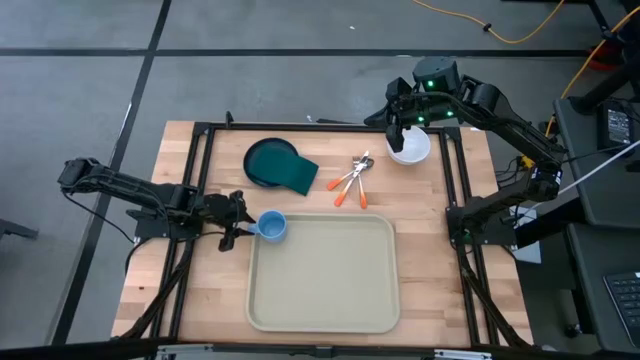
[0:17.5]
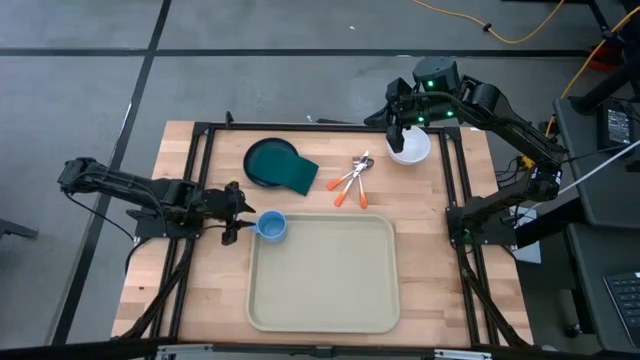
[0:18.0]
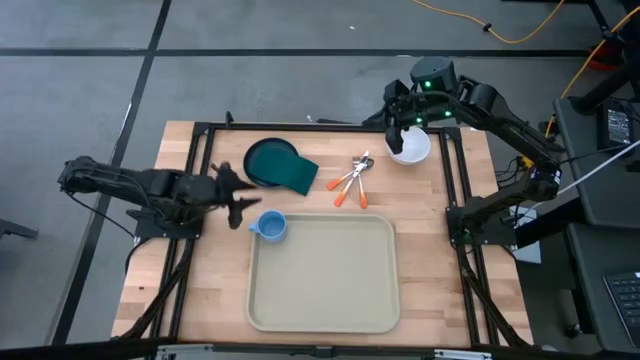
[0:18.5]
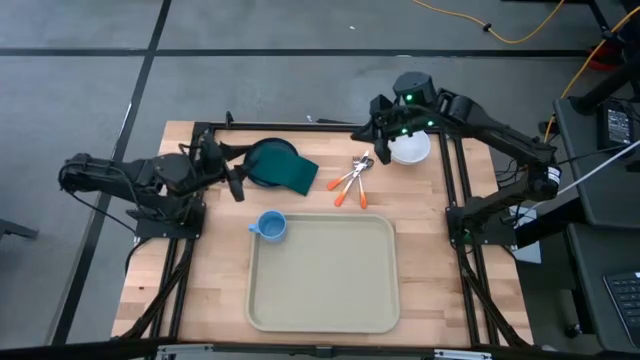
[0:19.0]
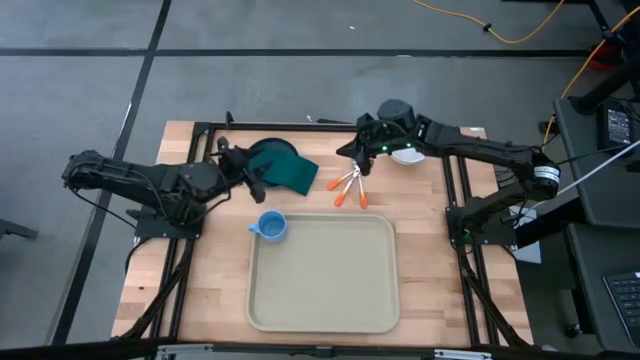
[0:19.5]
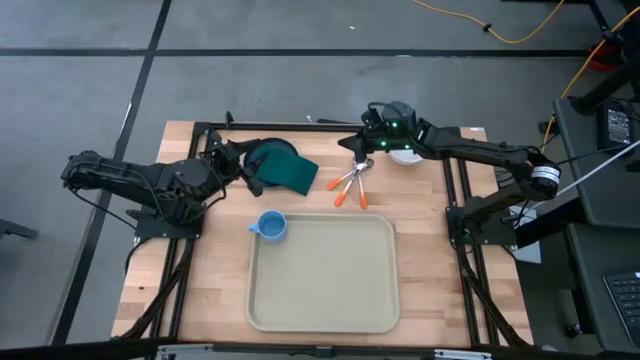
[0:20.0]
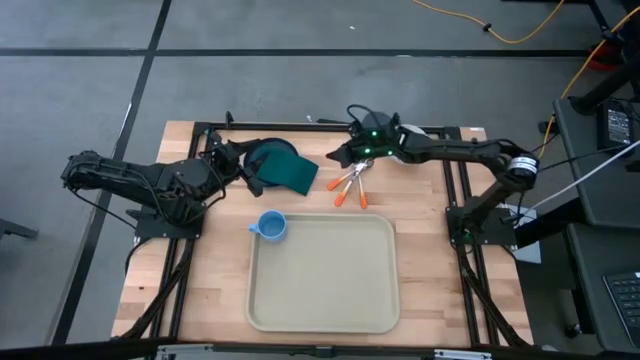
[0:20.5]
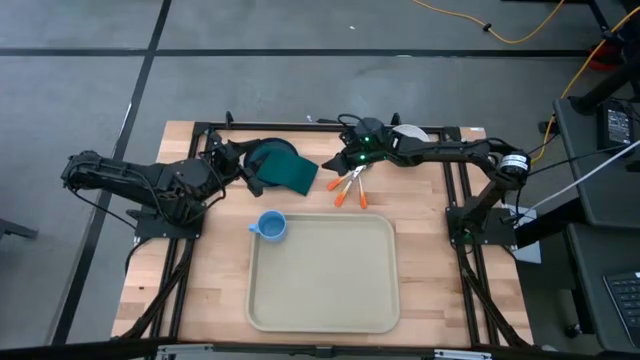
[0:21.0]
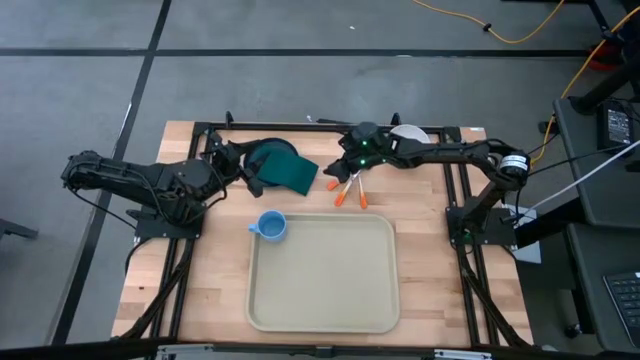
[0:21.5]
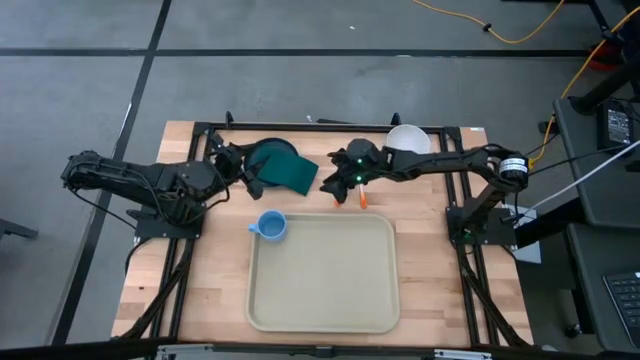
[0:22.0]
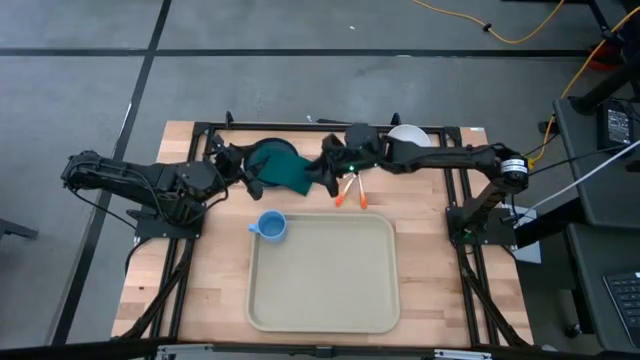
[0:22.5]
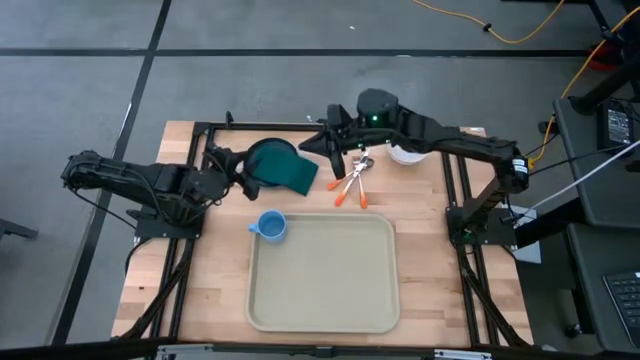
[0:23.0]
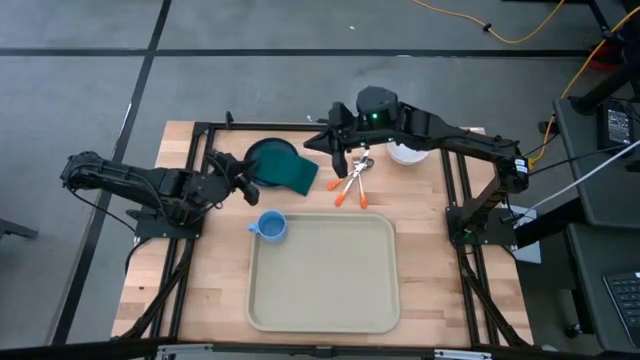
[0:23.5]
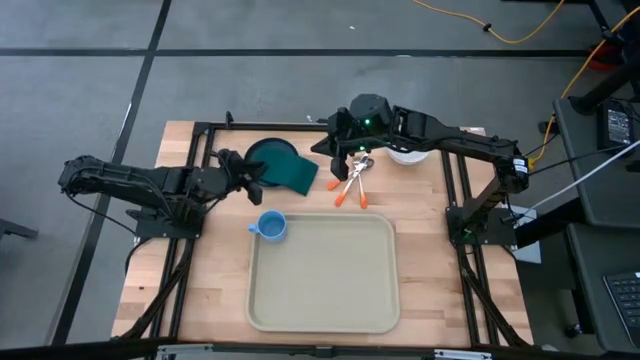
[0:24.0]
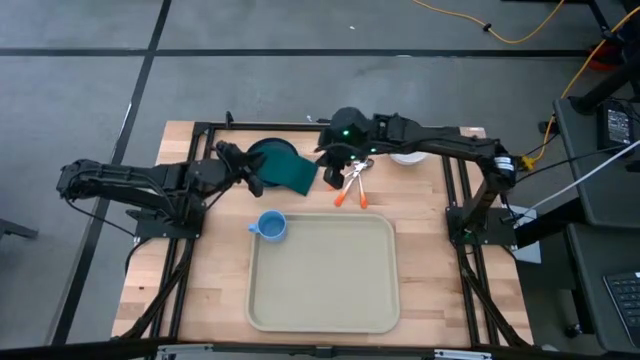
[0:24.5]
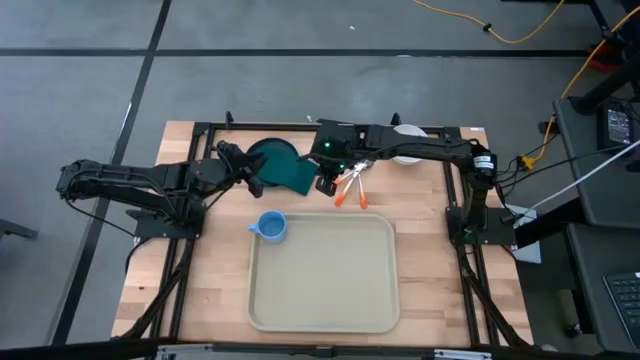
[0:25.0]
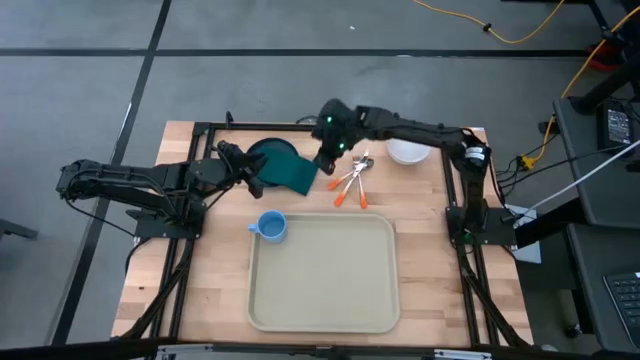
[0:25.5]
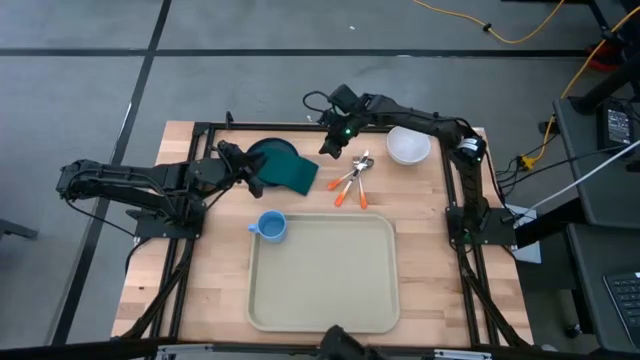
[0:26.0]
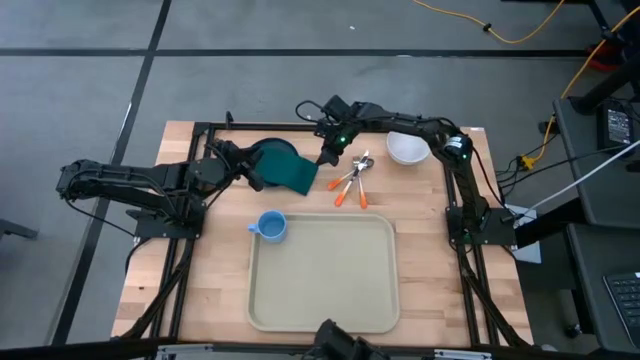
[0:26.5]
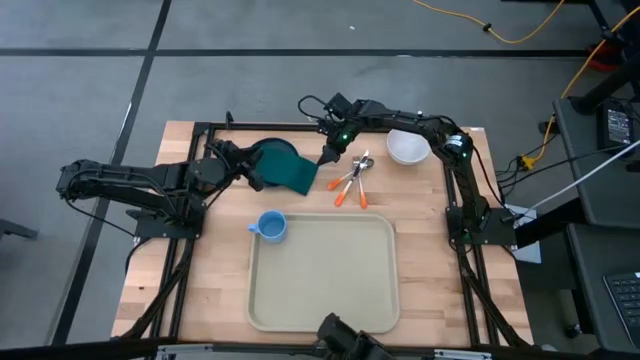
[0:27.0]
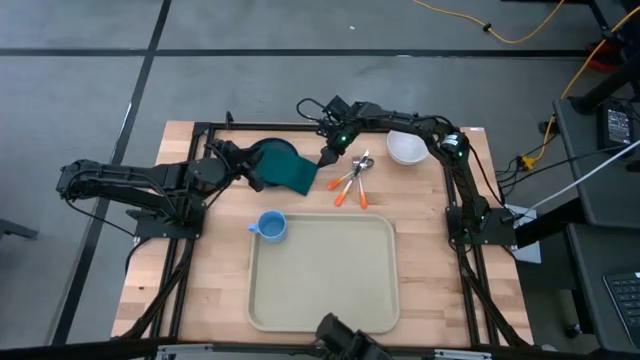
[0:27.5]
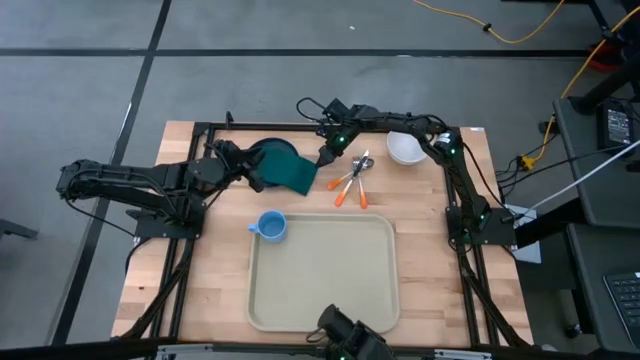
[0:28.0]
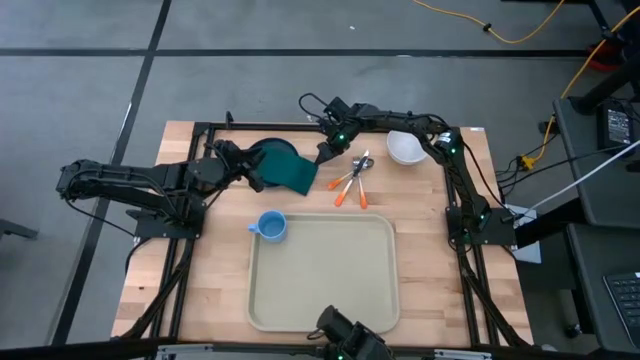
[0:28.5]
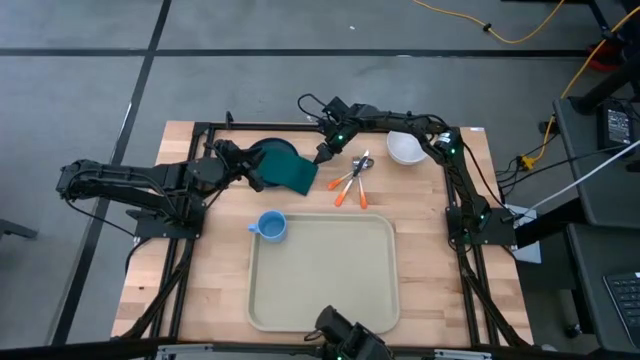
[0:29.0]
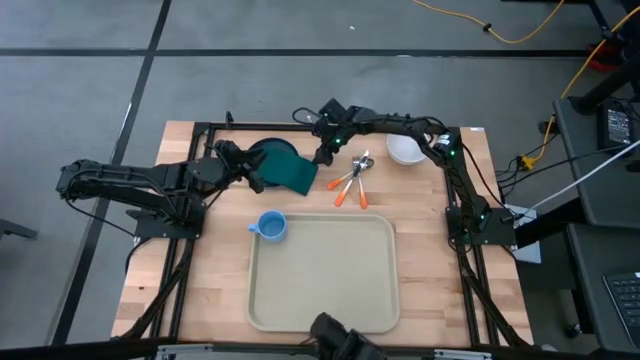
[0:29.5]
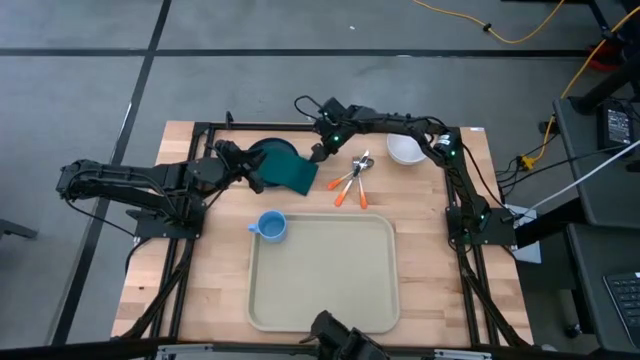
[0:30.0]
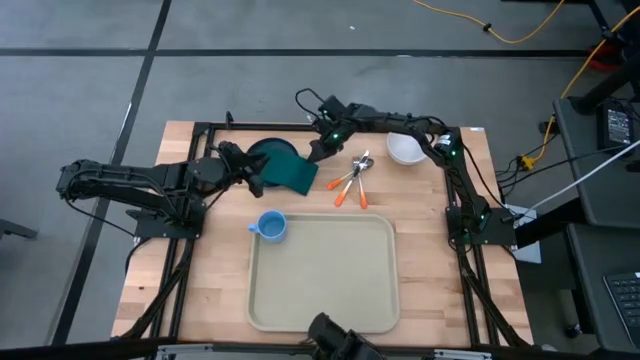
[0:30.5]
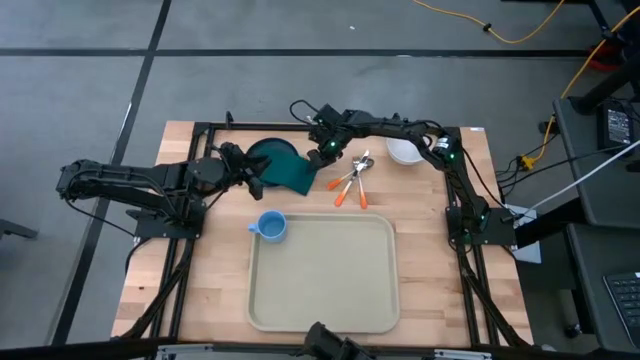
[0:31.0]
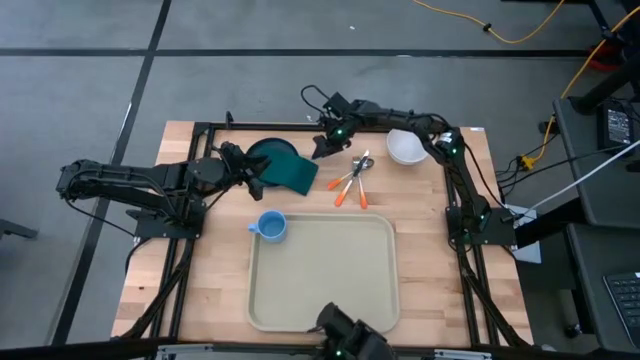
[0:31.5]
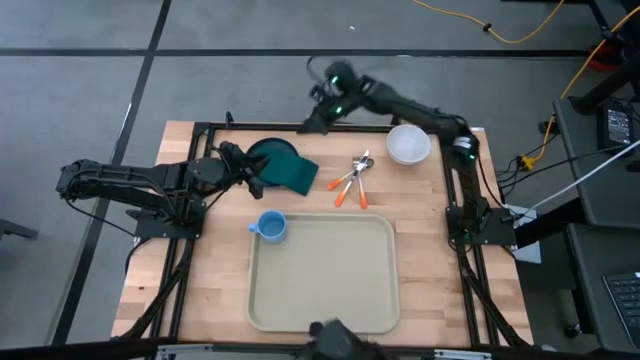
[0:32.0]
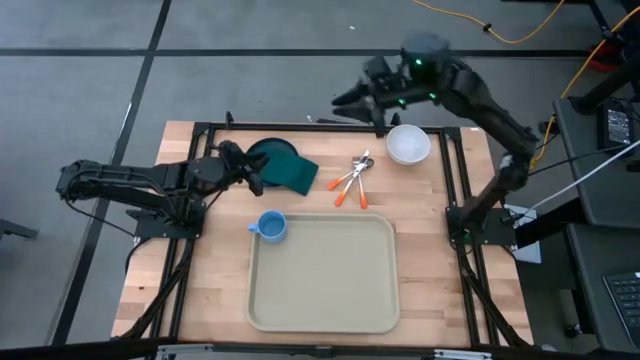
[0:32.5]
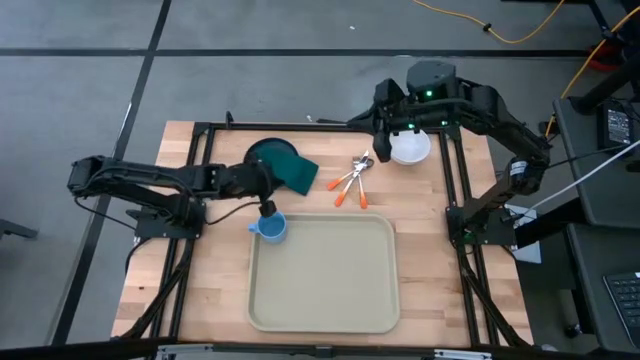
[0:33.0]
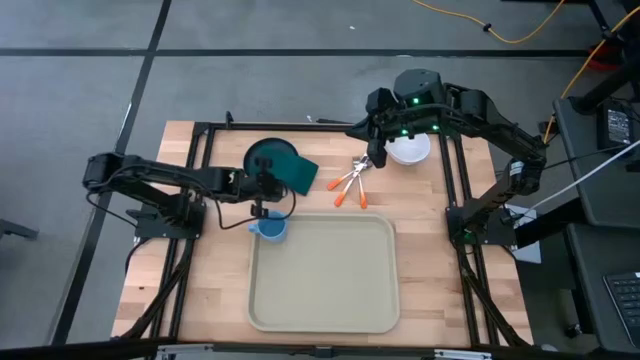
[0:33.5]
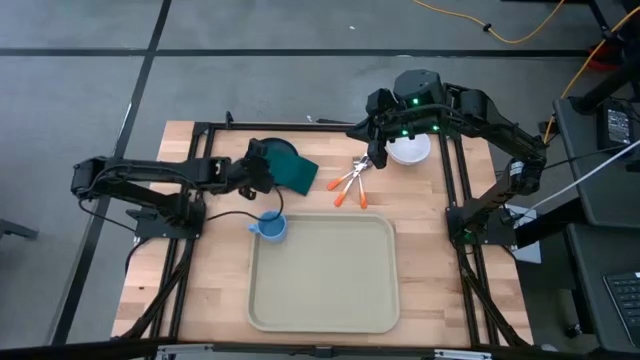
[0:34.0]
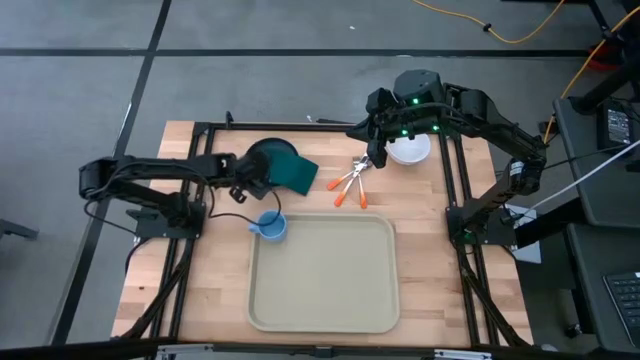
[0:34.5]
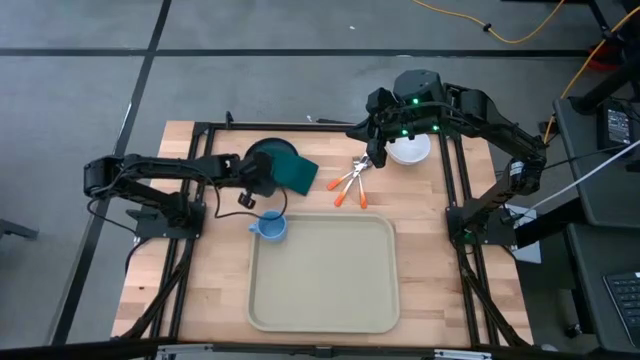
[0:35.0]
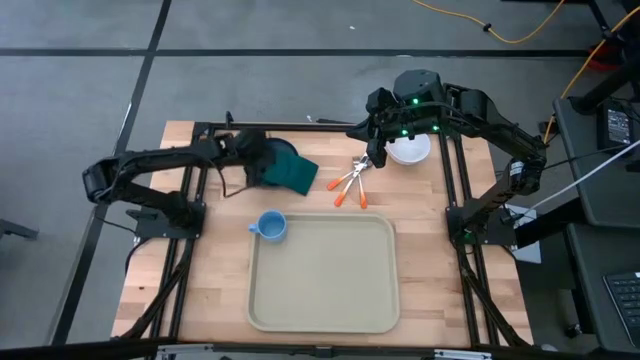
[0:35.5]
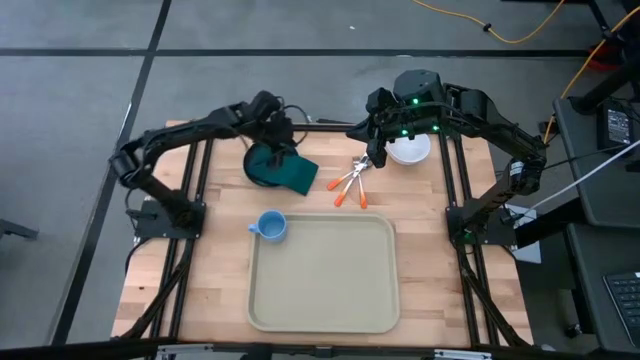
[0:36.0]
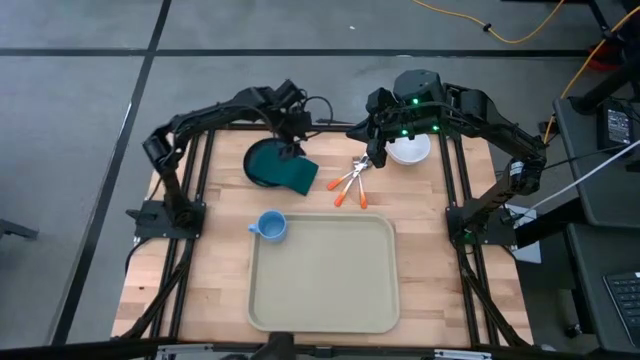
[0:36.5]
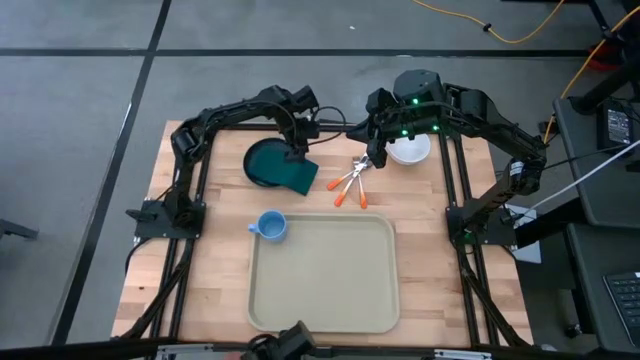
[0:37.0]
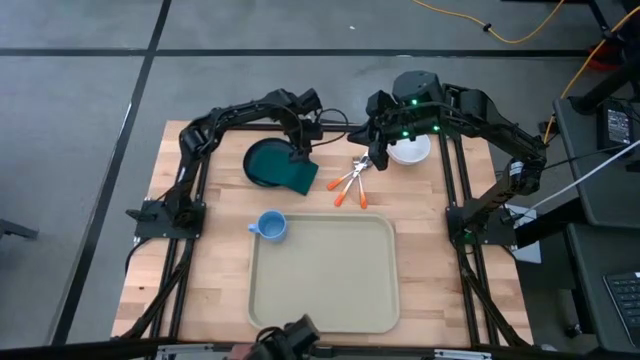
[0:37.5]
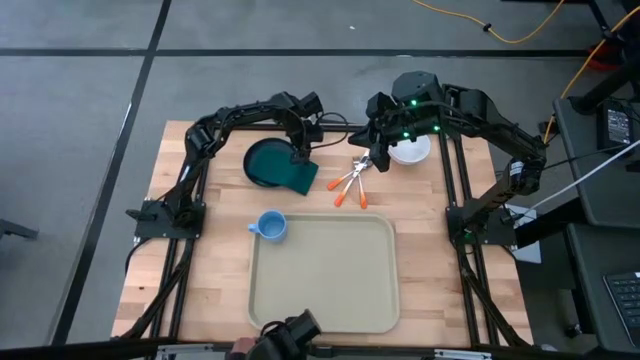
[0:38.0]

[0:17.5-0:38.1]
Task: Set up tray
Put the dark green napkin on the right of the light brown serving tray
